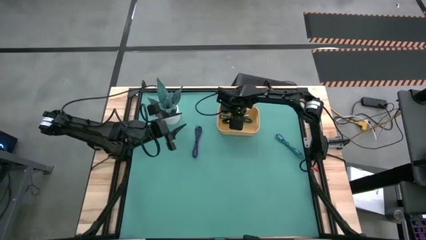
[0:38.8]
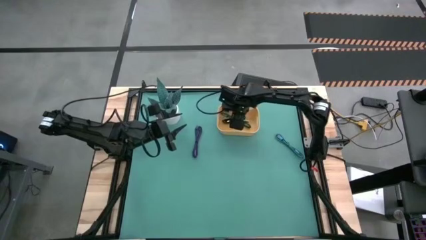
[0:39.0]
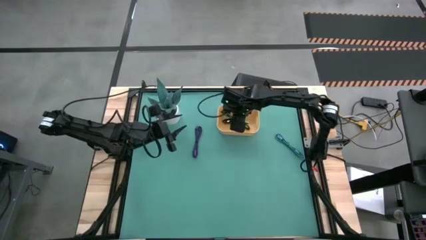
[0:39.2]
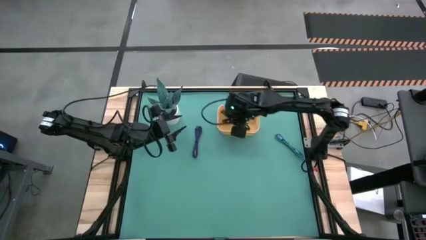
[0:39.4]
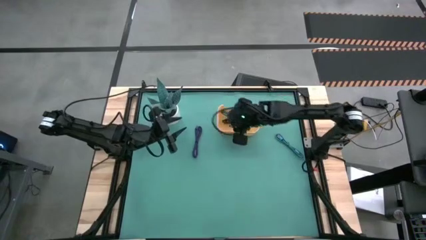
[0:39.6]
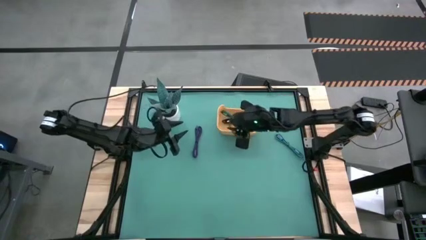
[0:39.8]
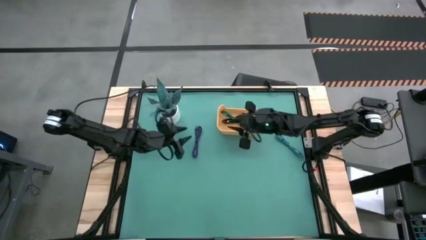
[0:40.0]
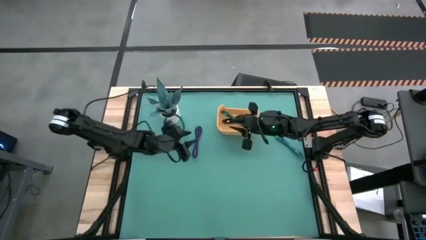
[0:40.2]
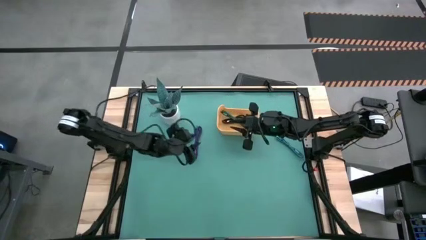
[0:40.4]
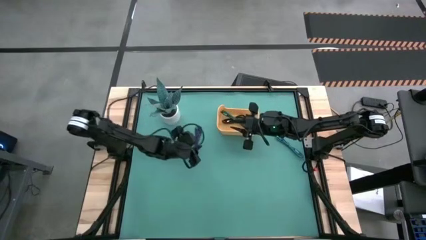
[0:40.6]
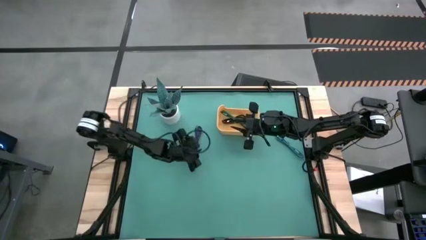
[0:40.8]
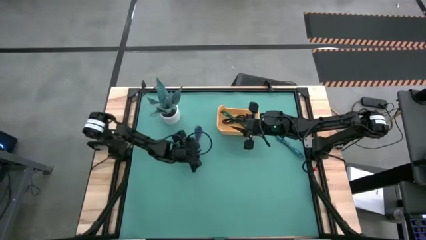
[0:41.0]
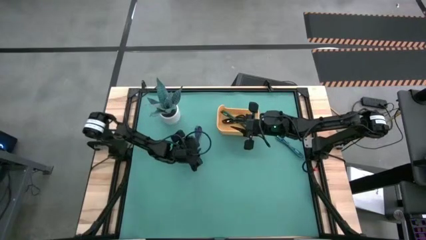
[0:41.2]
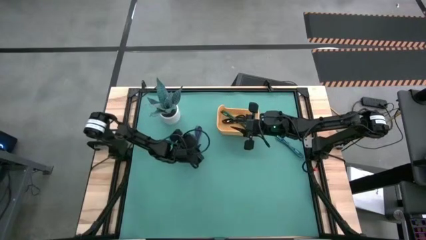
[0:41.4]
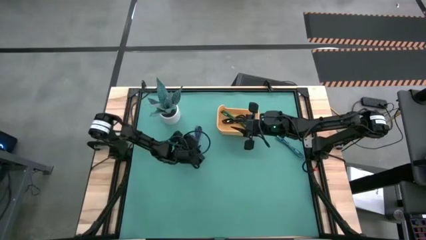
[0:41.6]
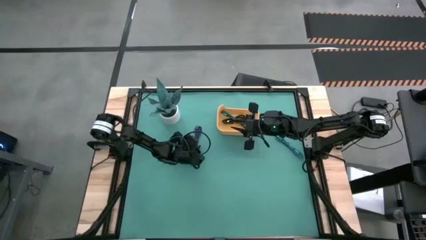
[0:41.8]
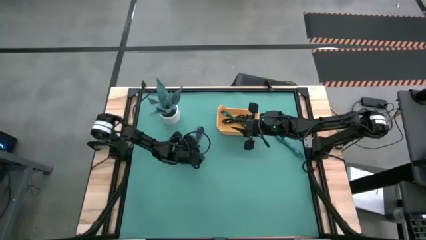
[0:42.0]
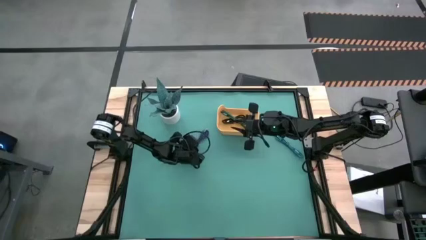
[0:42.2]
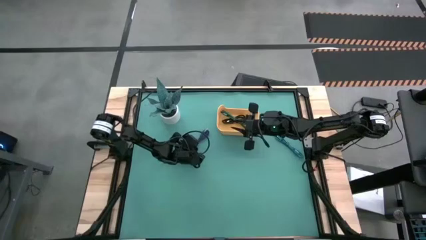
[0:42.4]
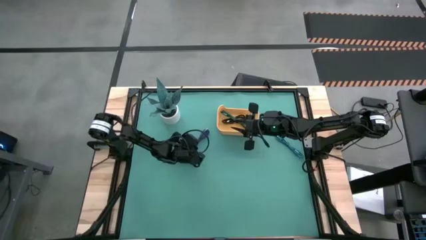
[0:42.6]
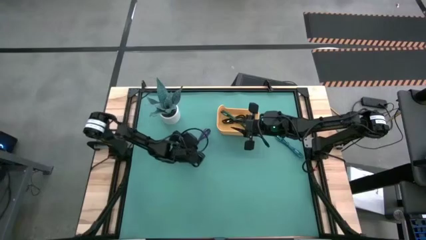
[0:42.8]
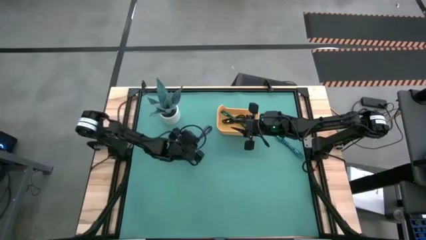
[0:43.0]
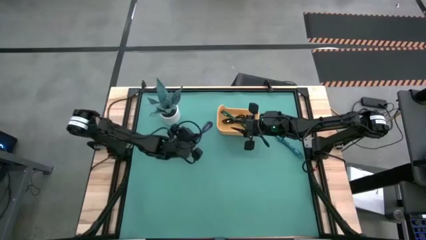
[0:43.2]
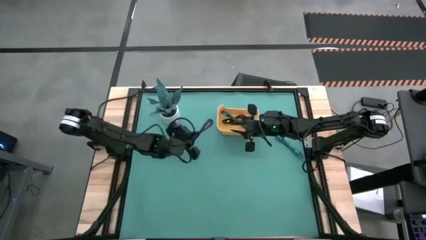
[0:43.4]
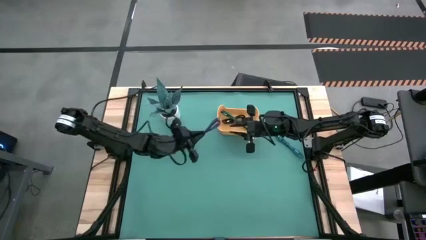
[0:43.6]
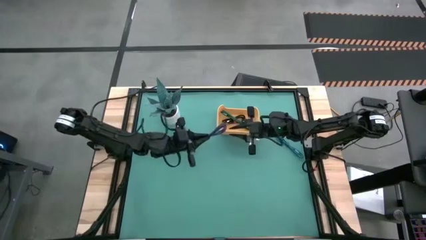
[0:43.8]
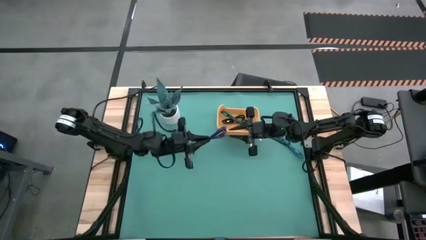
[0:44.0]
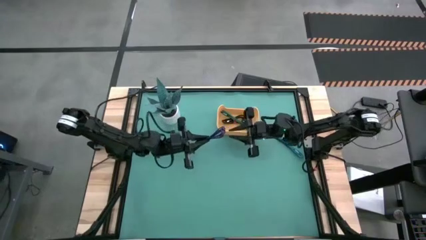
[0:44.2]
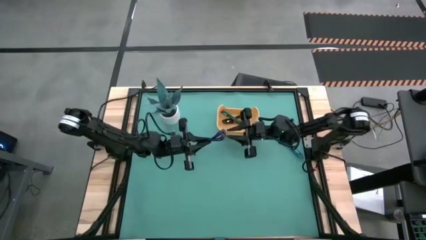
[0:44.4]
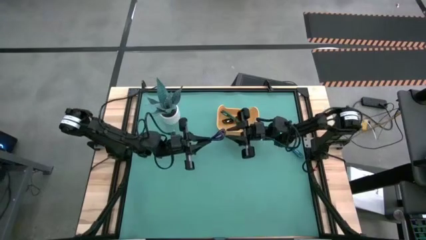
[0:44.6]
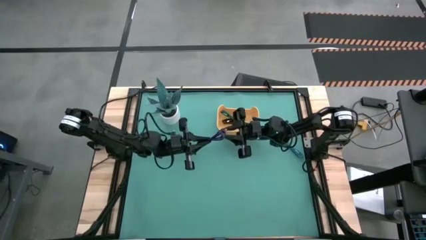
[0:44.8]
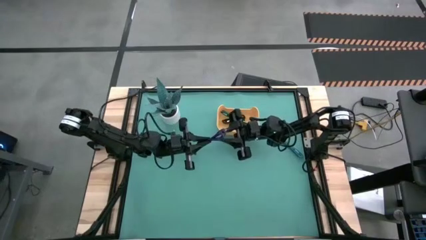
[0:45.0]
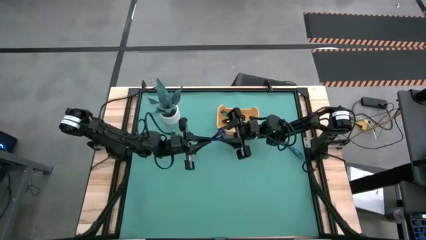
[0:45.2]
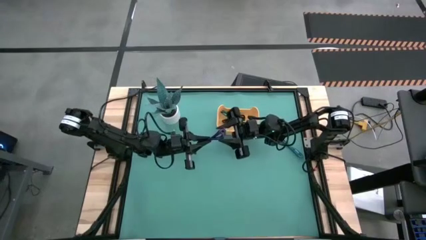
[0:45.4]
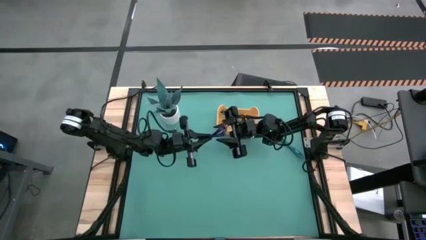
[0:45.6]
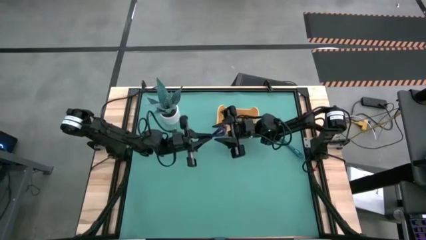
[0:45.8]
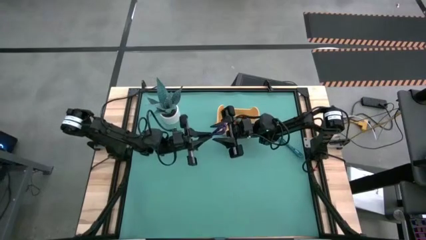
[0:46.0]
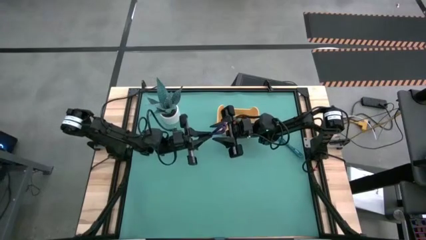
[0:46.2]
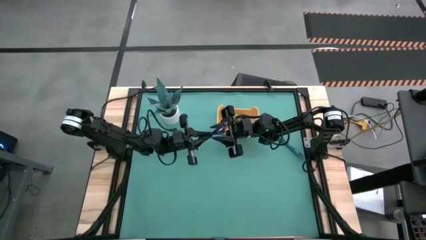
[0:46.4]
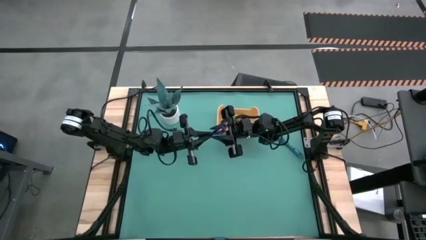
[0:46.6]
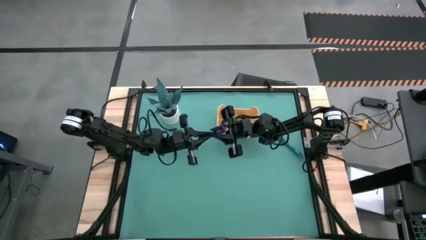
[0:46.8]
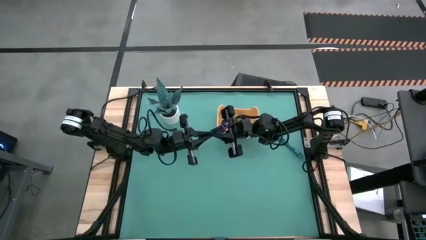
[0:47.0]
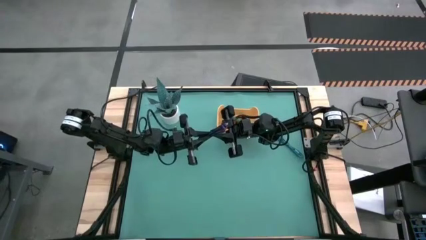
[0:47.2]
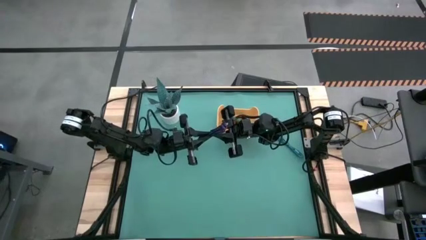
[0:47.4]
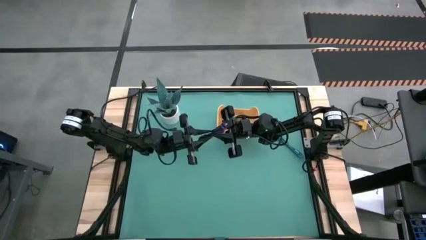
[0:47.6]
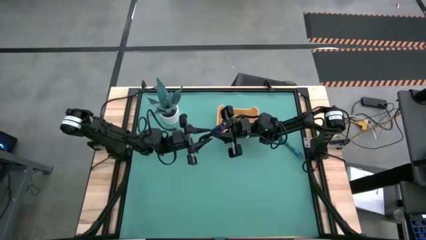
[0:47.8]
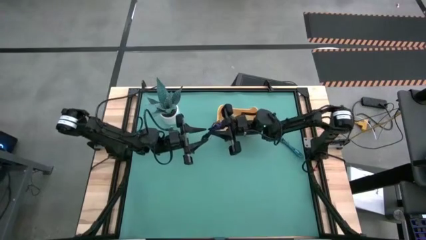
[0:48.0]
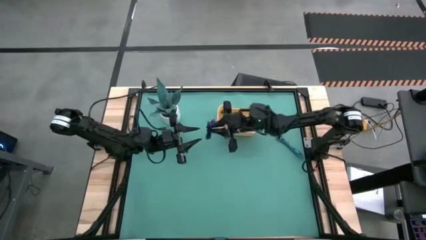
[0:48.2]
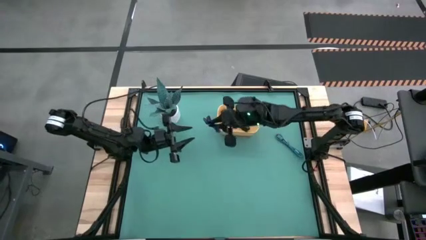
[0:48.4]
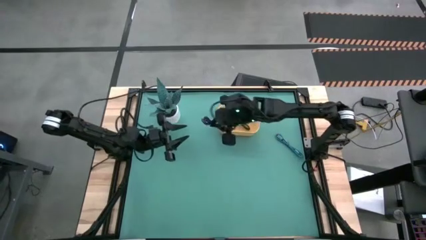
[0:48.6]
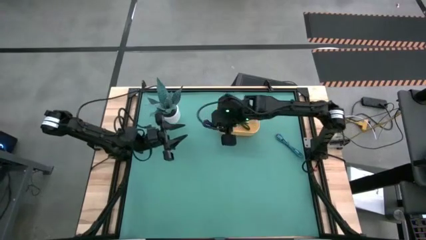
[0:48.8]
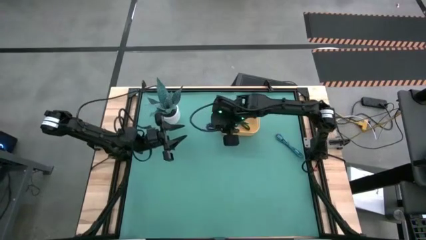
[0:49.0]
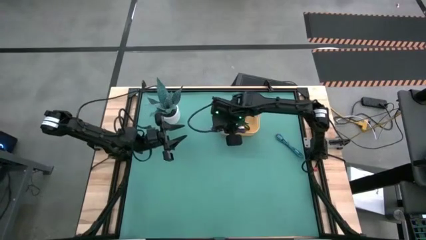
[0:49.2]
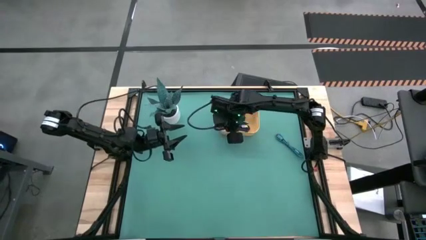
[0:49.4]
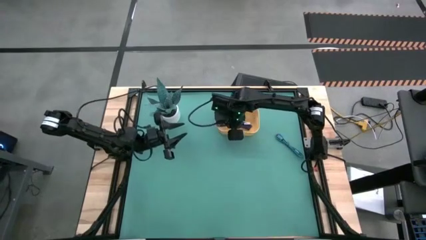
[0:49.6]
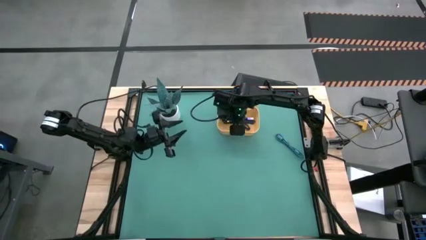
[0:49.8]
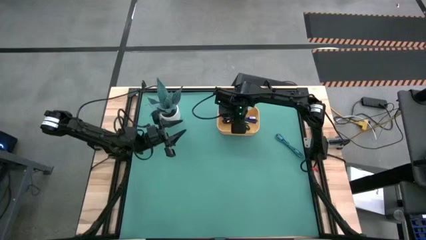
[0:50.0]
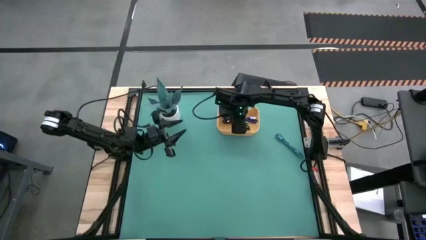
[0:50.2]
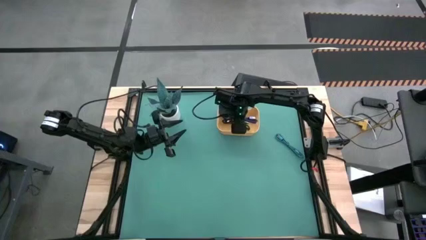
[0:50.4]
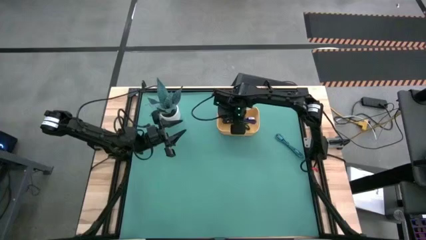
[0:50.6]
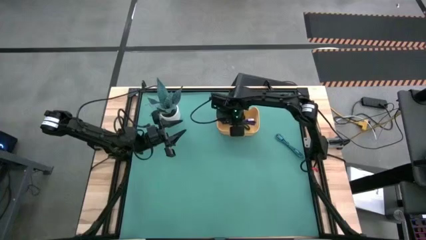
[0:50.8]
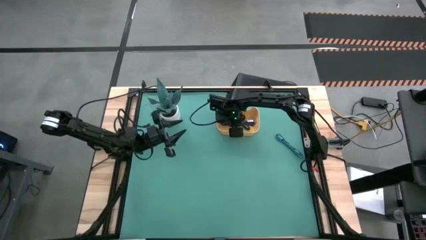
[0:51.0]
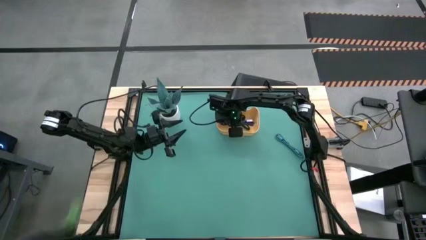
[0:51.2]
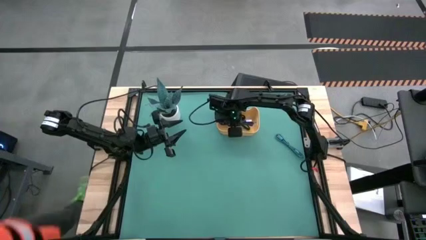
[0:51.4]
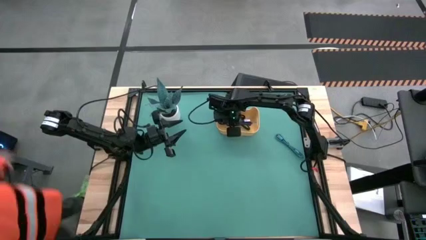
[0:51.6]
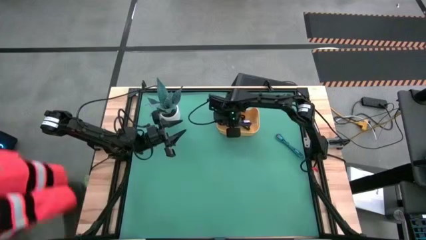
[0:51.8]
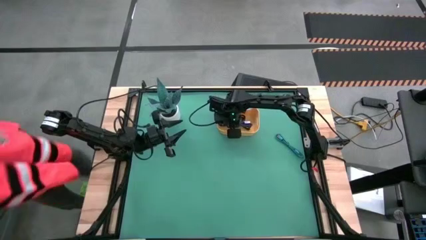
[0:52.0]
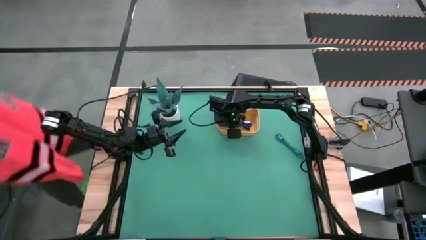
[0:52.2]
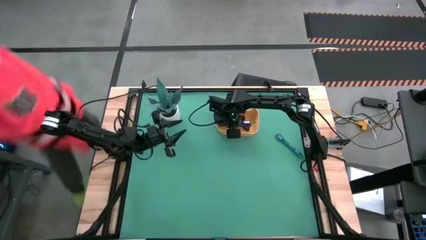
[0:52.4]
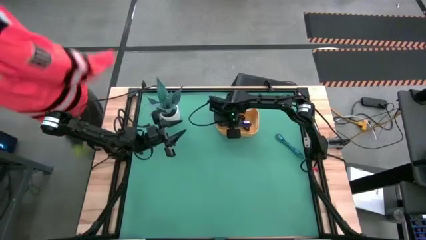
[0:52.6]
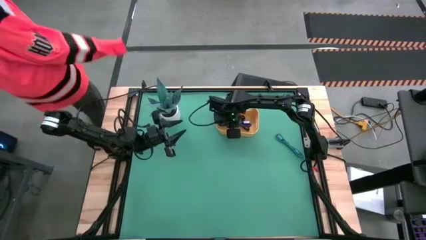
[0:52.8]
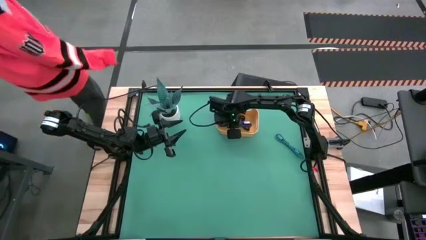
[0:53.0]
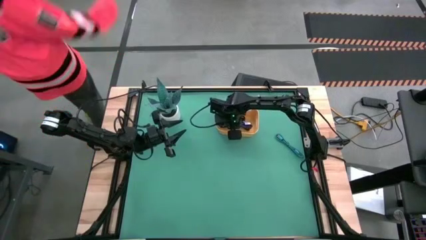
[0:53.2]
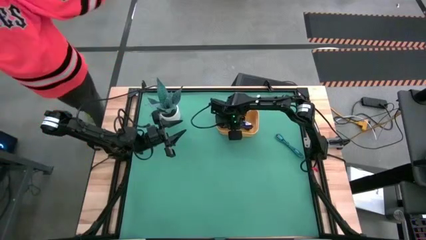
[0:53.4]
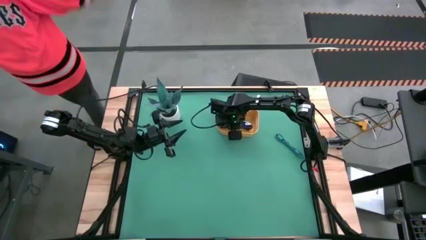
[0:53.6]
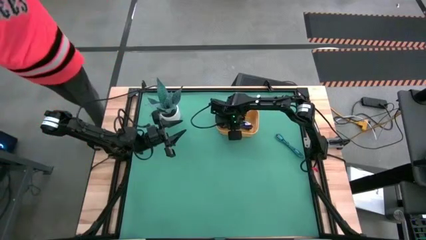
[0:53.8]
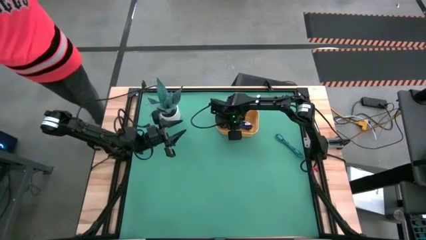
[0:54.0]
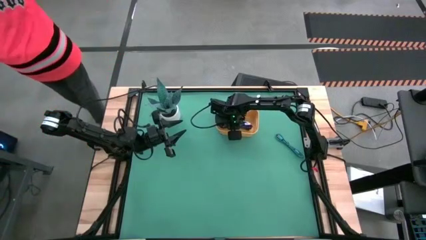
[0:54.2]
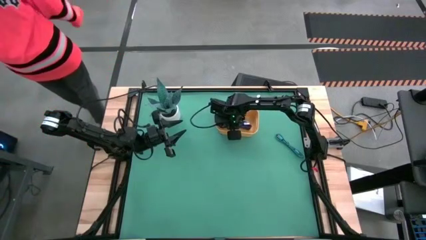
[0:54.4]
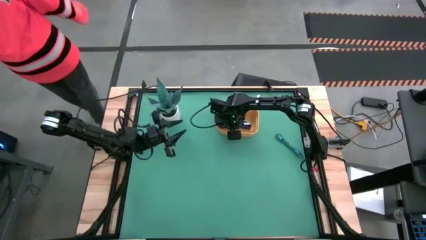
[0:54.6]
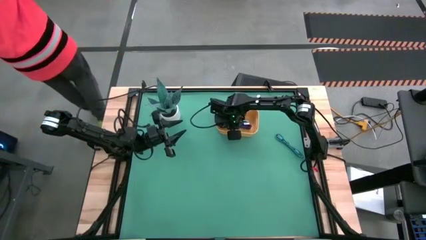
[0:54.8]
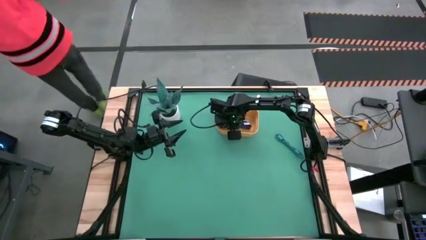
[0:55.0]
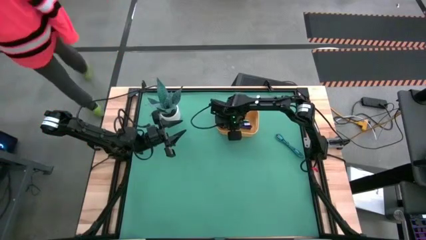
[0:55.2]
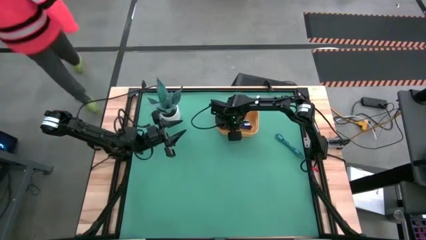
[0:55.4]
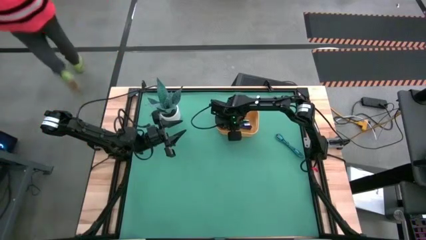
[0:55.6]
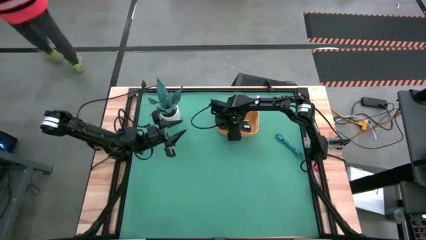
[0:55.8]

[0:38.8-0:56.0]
Task: Pick and place USB-C Cables
Put the purple charger cable into the yellow bin
